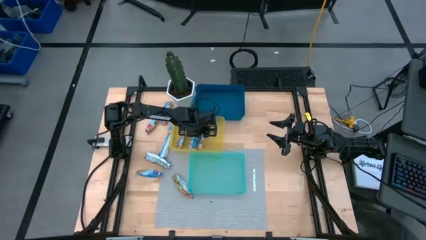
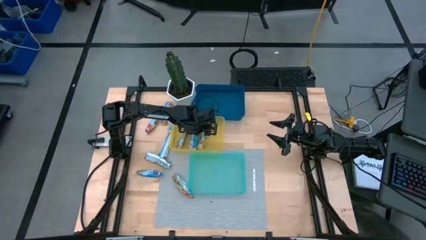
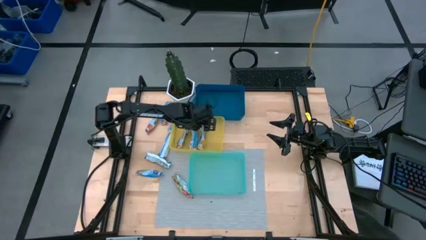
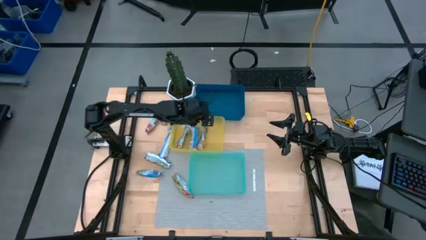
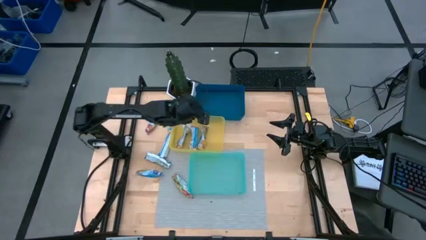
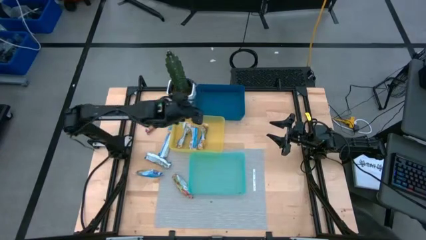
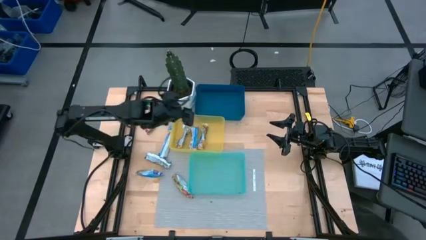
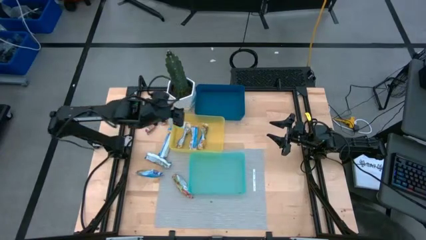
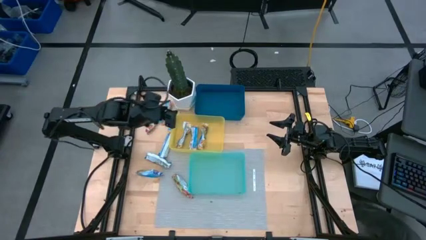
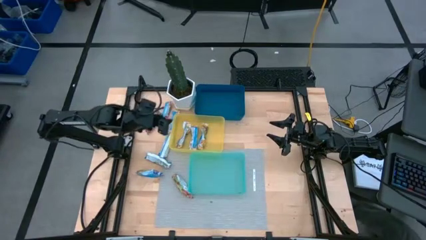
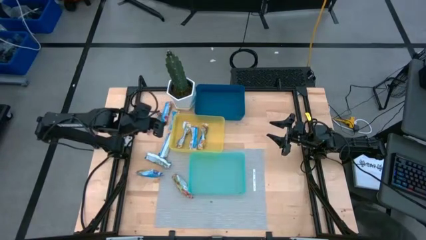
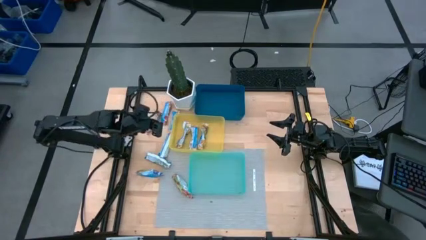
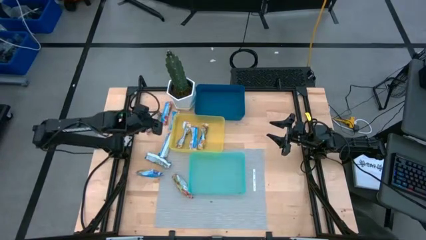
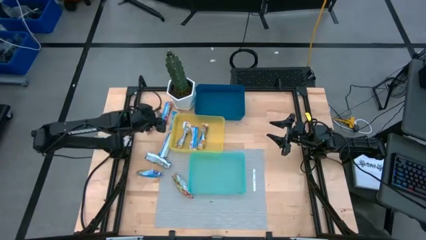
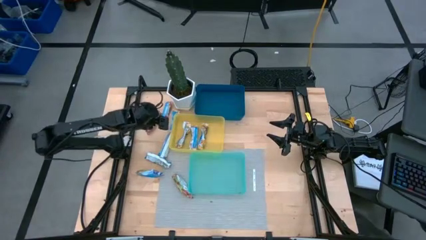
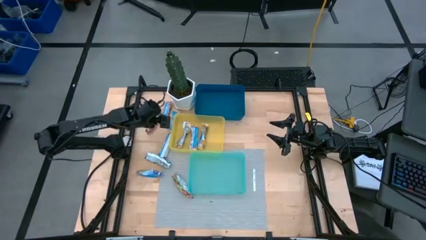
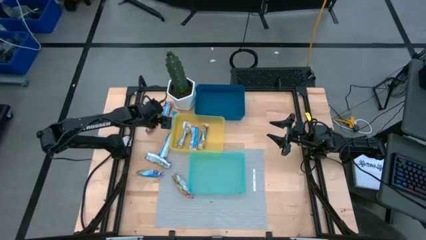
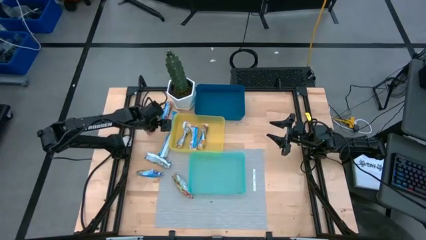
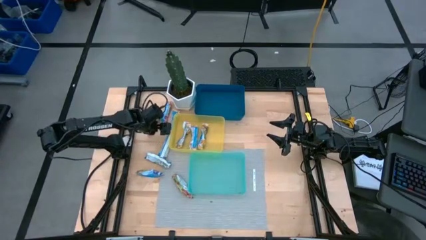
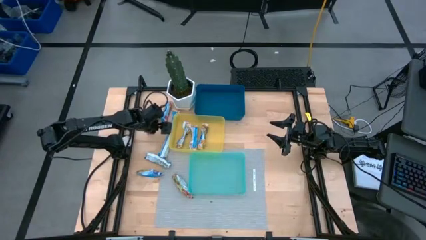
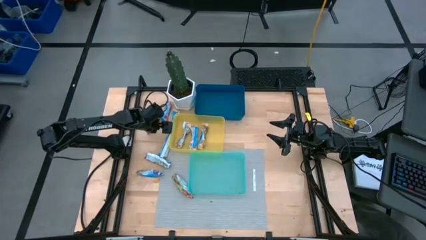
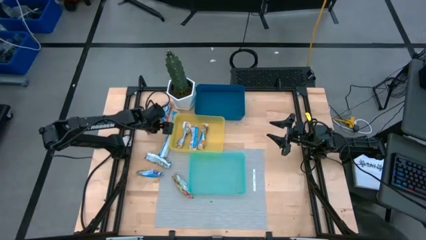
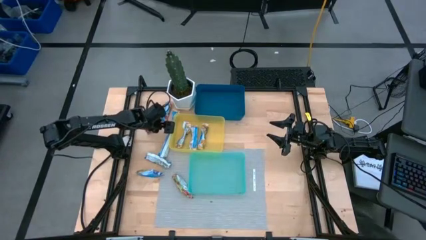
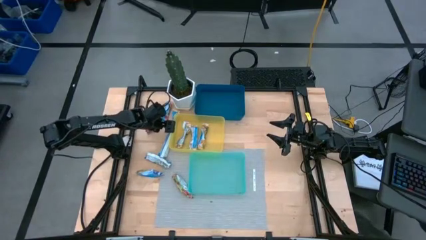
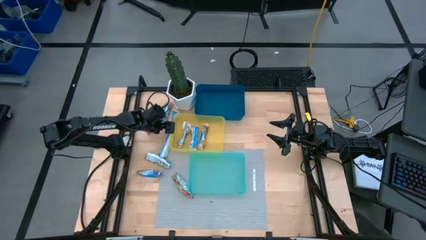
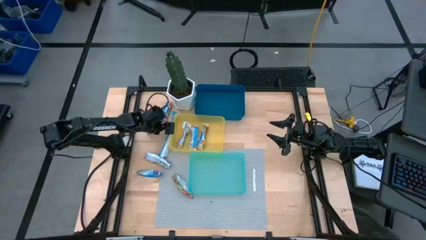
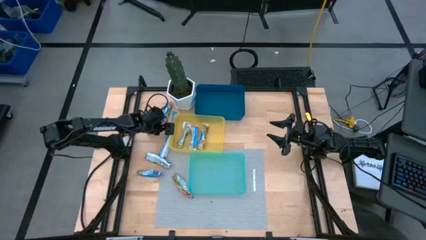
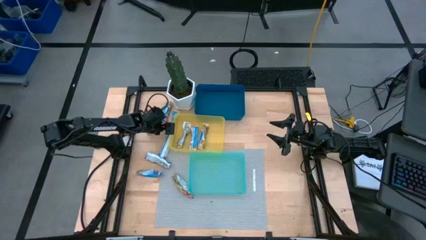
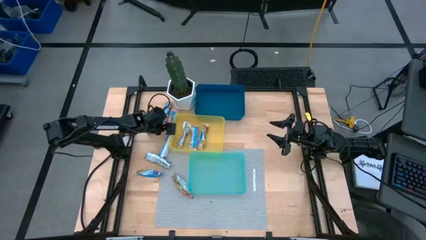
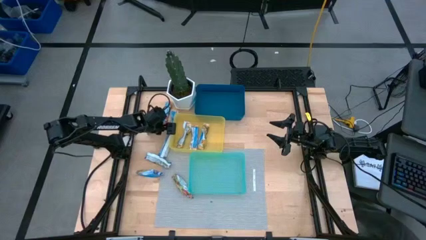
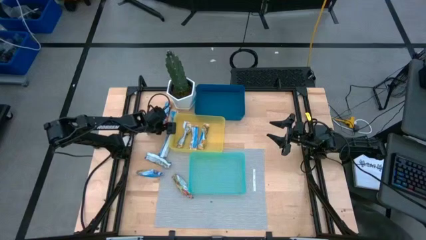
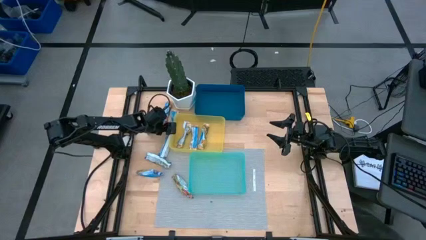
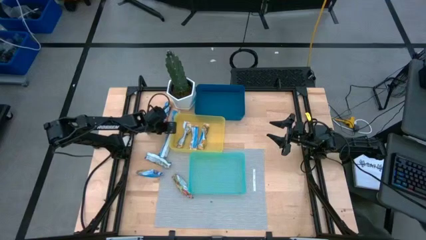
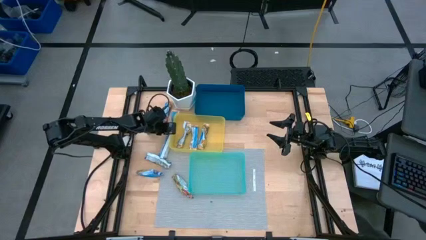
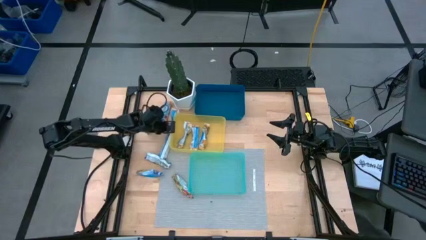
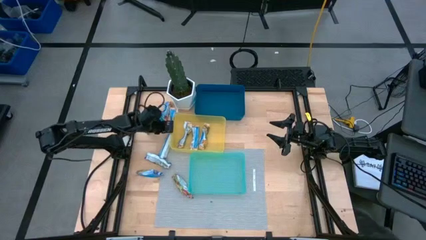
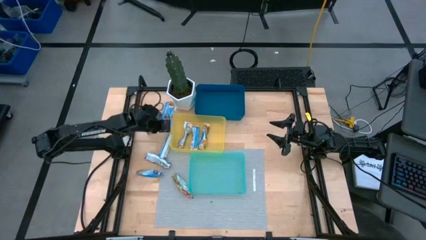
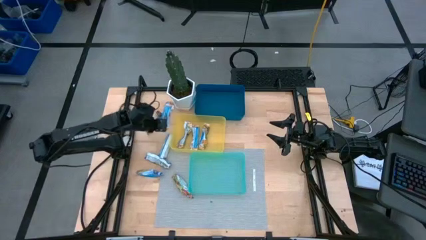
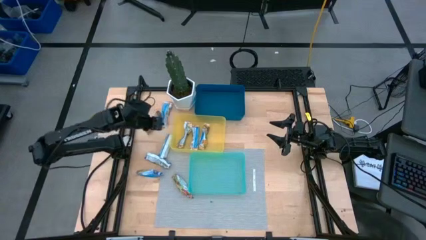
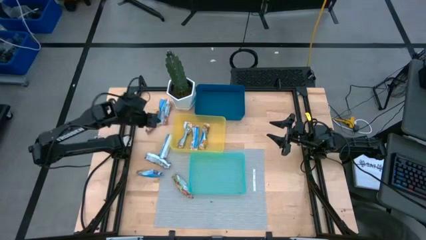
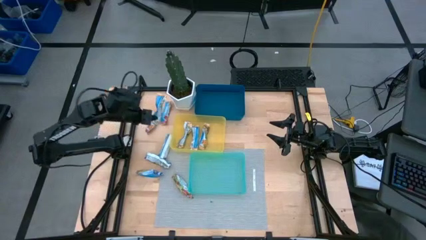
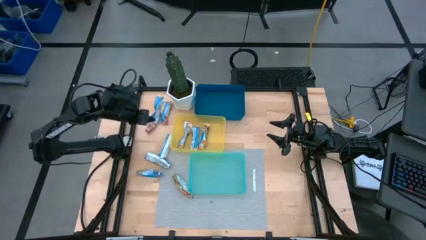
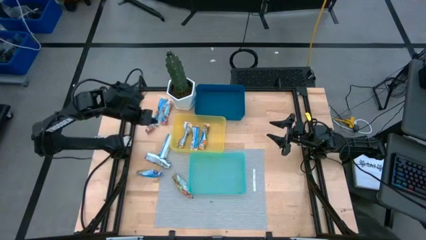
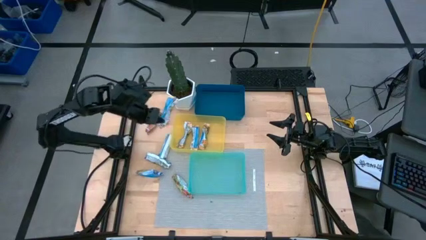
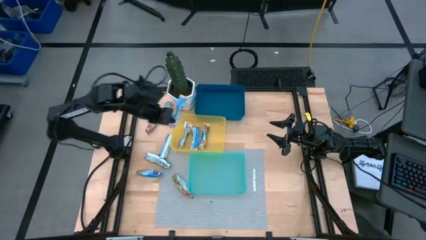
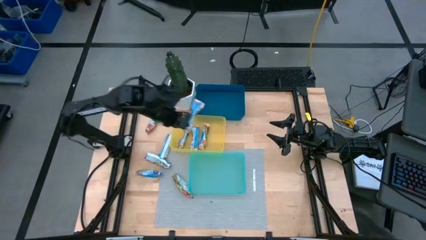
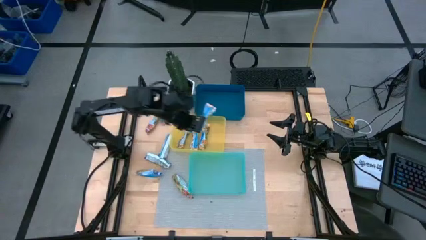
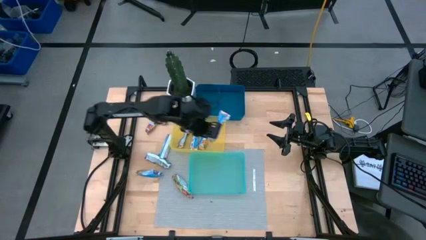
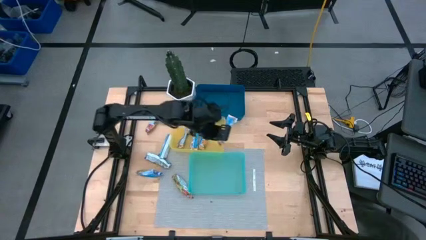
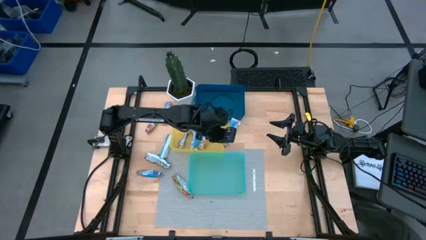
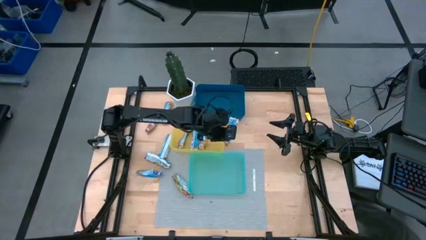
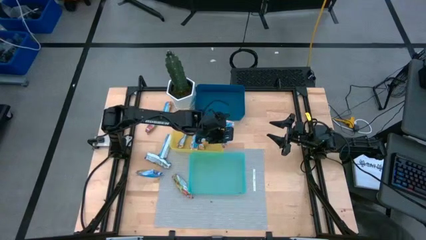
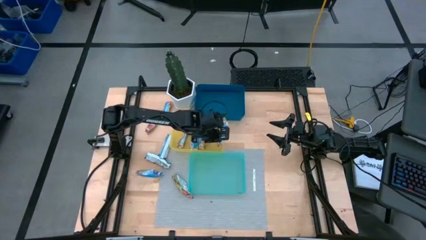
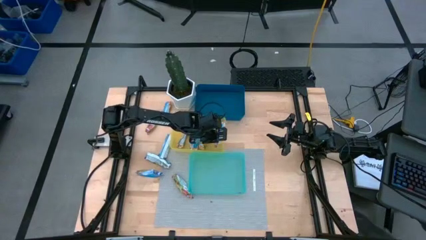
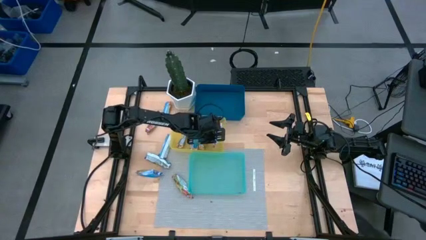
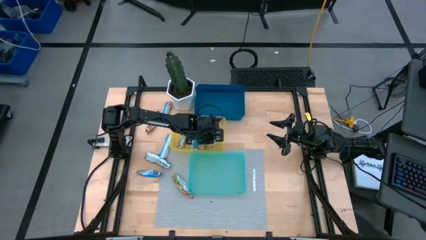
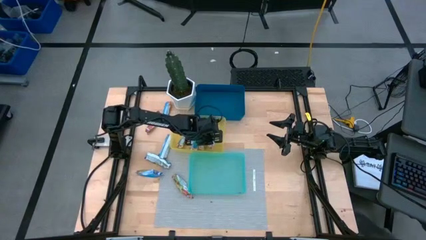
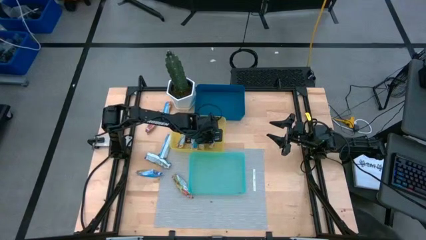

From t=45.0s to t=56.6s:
Task: Pick and place Granola Bars by type
Put the yellow granola bar into the yellow bin

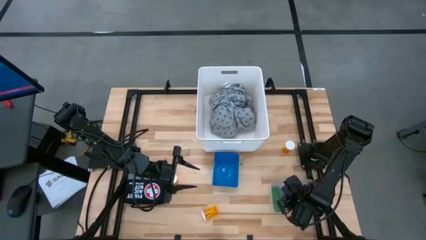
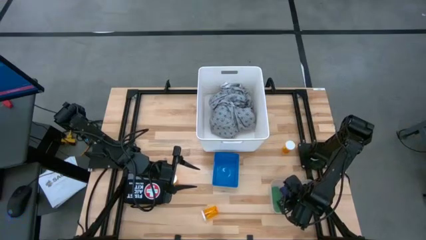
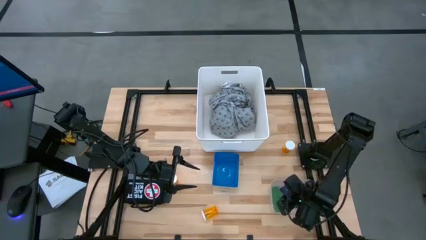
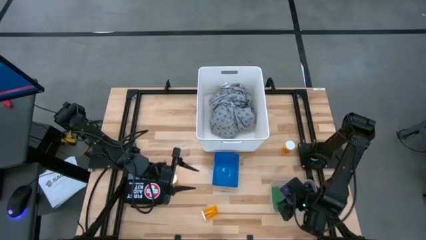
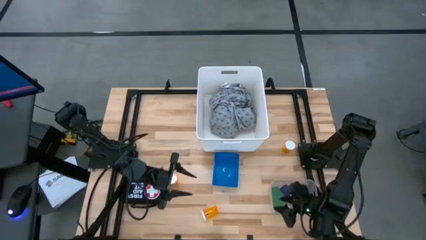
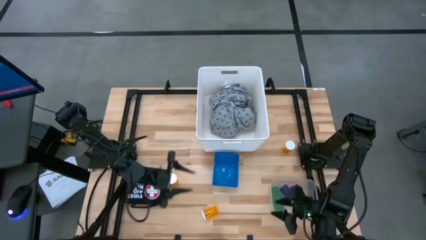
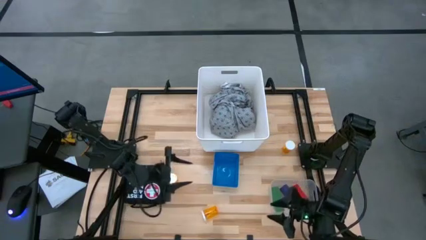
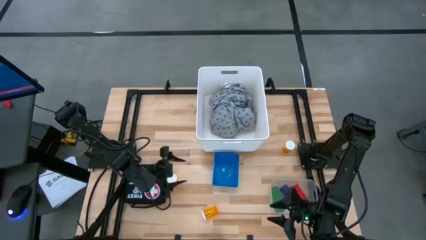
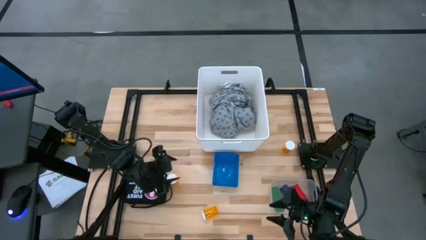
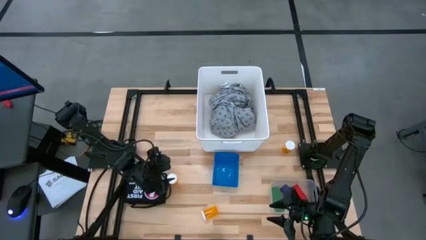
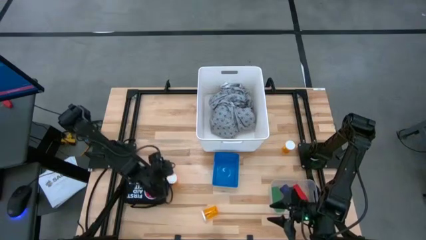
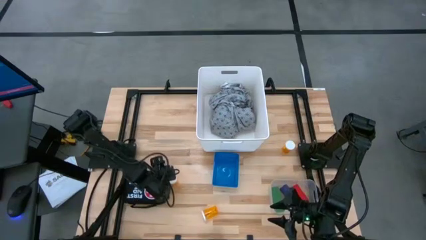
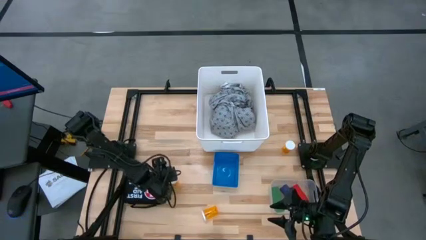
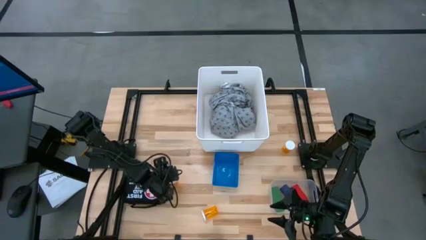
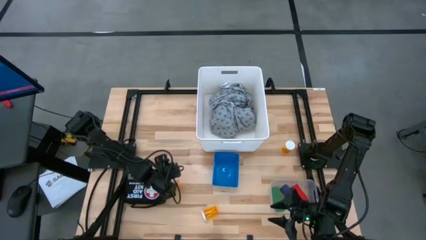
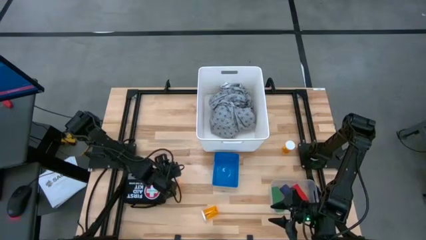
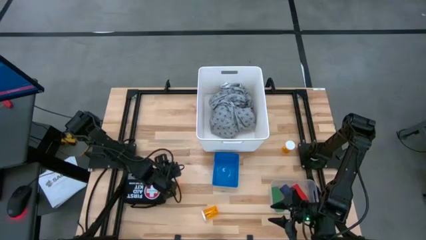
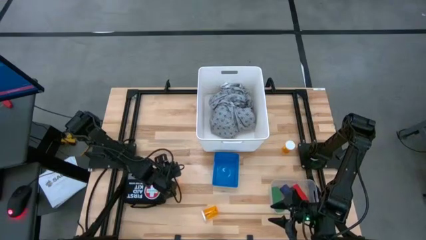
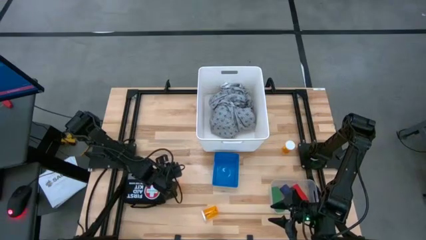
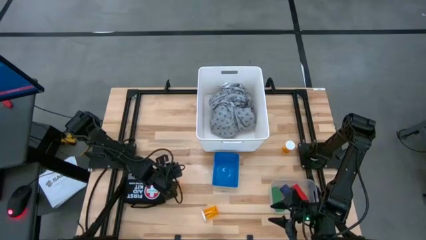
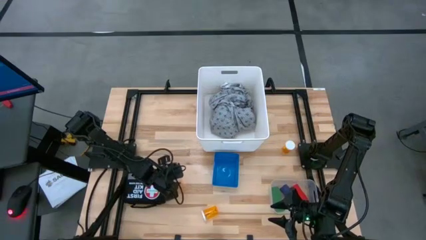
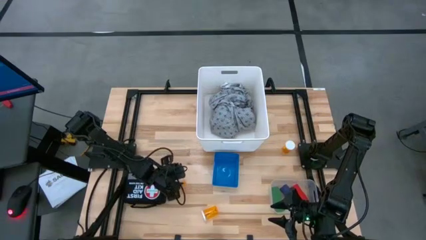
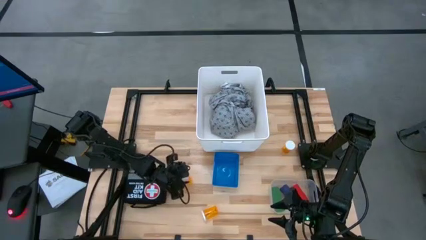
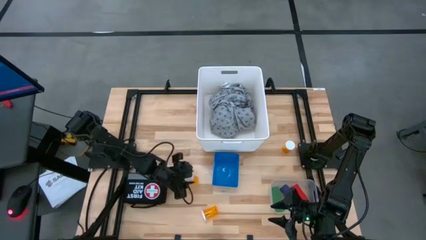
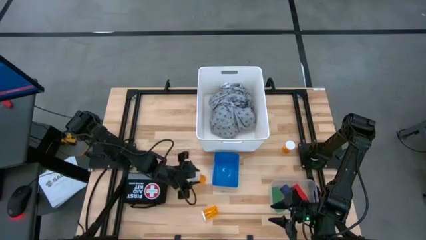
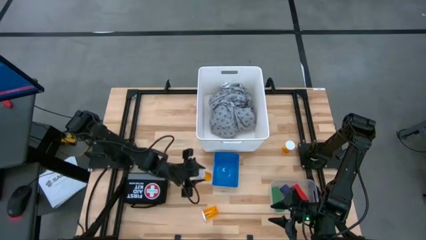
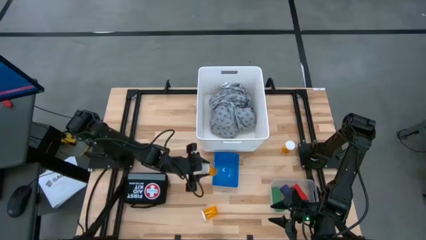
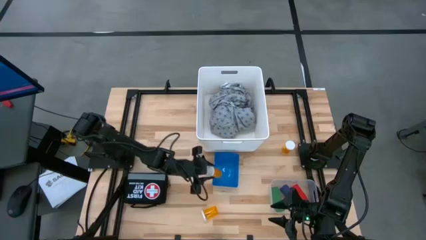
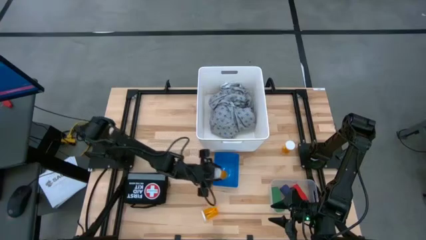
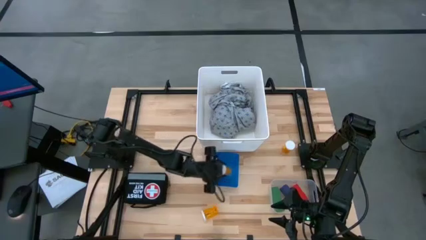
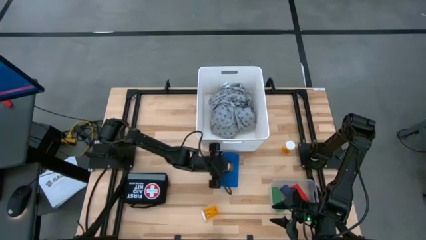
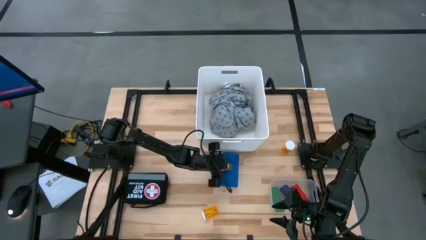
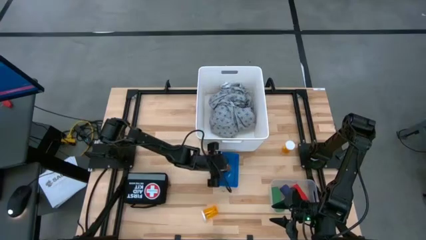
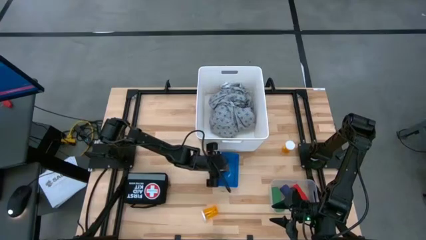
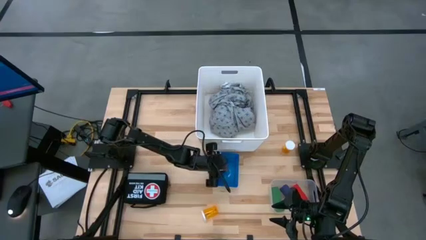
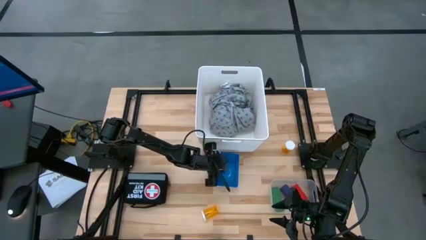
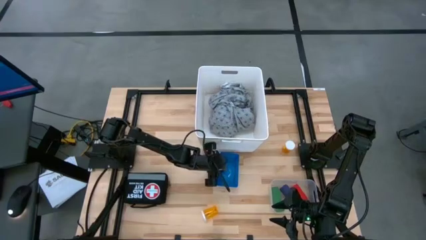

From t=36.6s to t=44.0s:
Task: Pick & place medical supplies in basket/bin
Put the middle left yellow pill bottle into the blue bin
